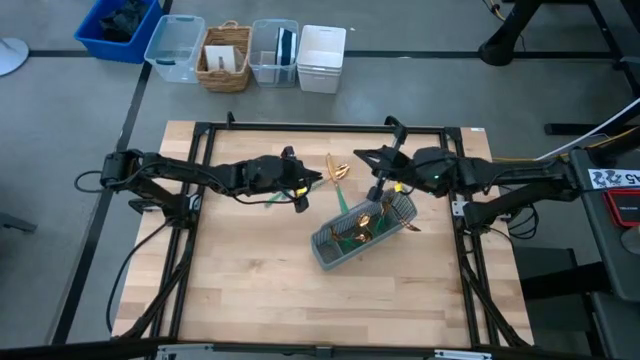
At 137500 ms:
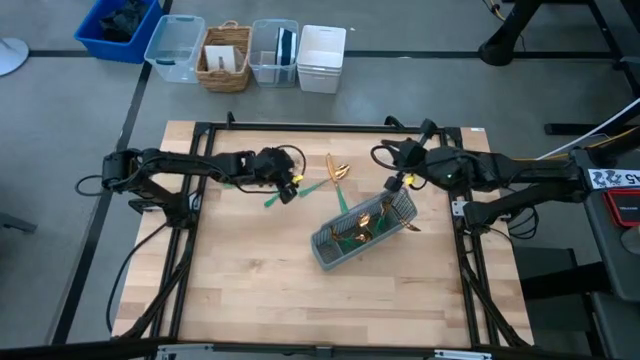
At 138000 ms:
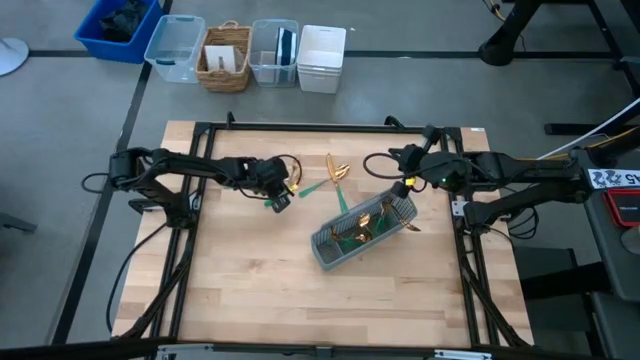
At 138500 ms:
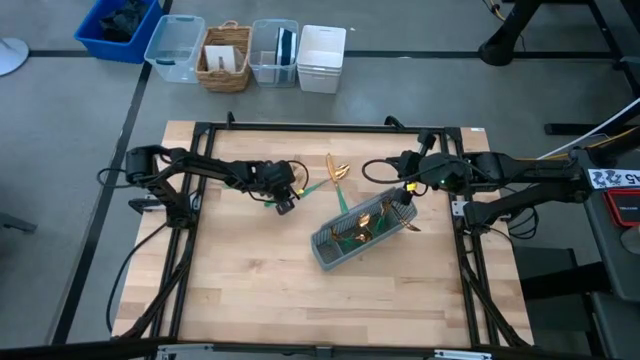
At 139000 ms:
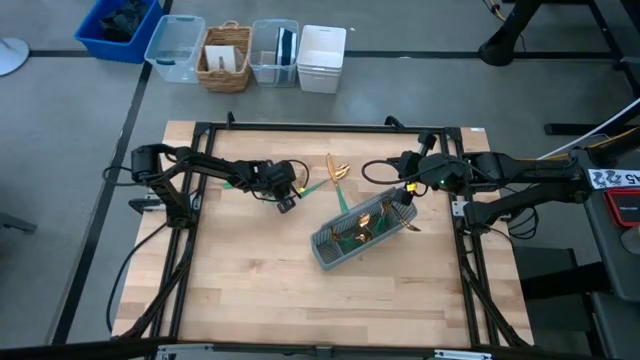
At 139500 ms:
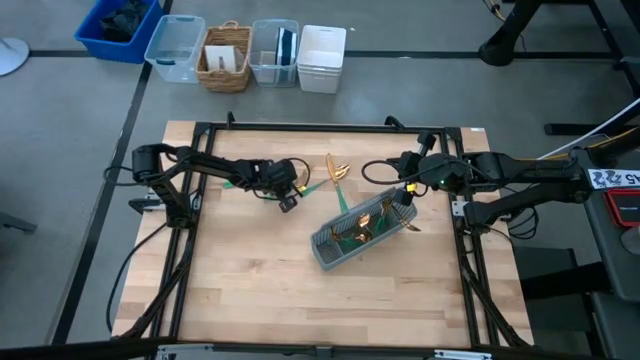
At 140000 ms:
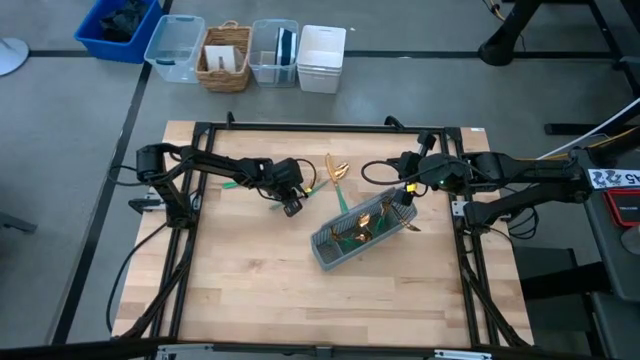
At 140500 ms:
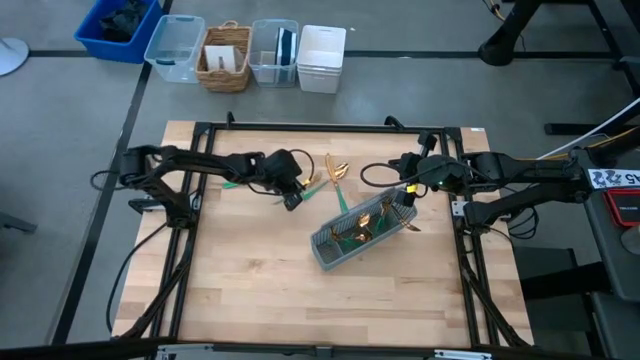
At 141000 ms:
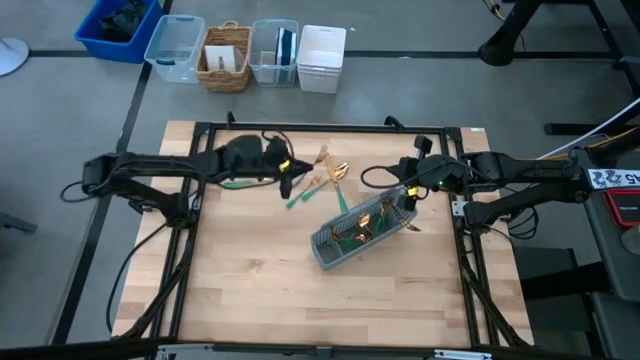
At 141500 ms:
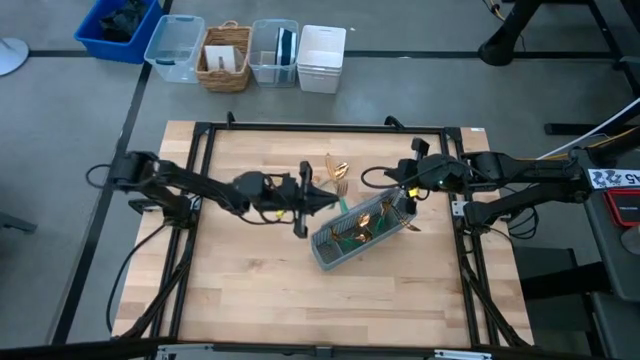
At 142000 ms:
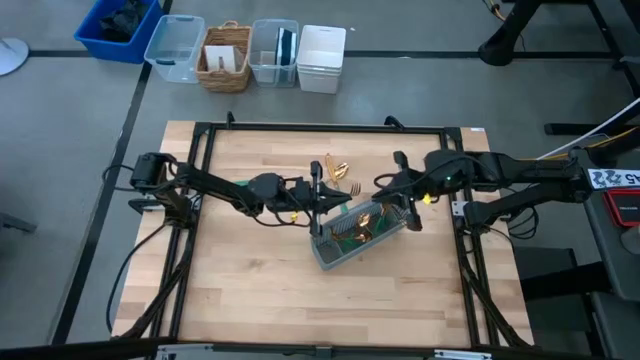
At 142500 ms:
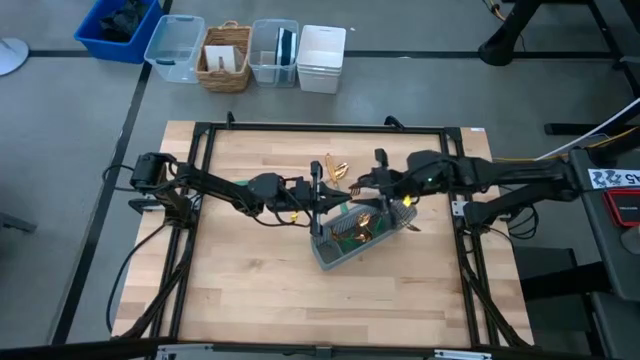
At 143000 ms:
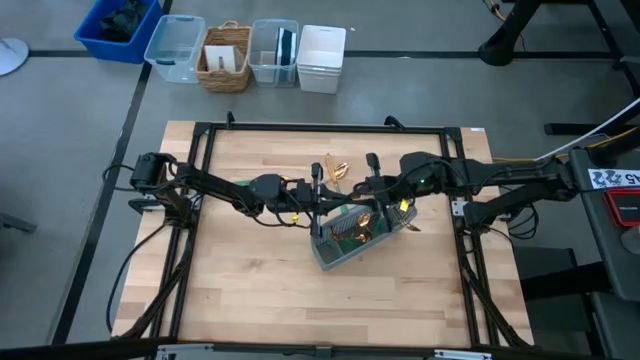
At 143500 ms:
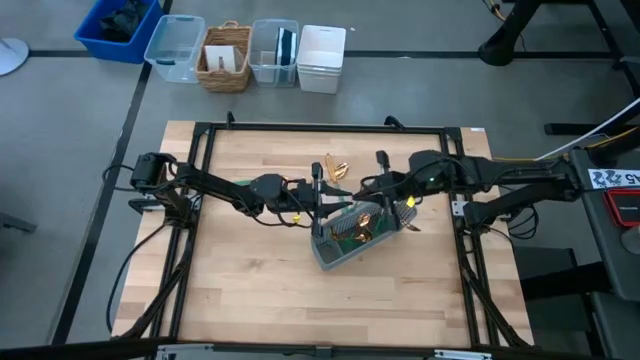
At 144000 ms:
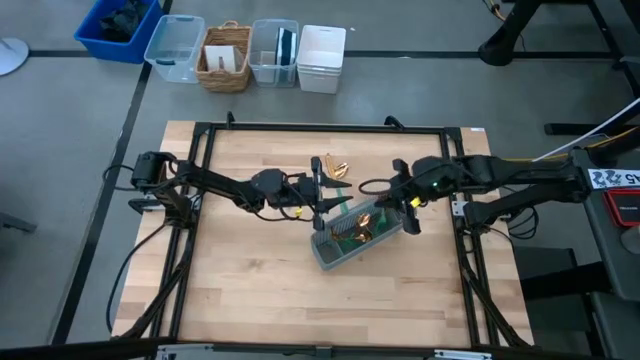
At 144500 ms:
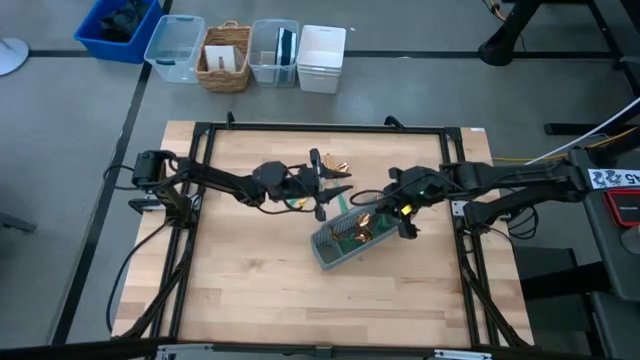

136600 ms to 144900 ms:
Task: Sort silverware
Put the gold fork into the gray silverware organizer

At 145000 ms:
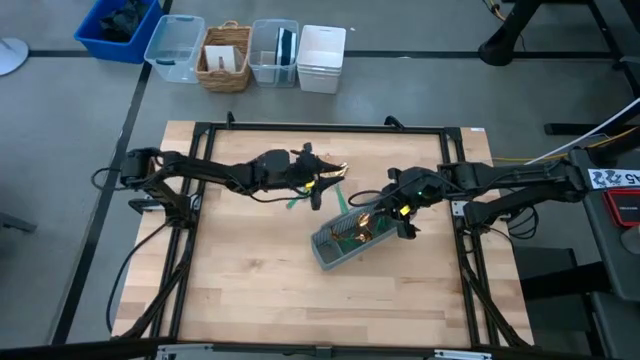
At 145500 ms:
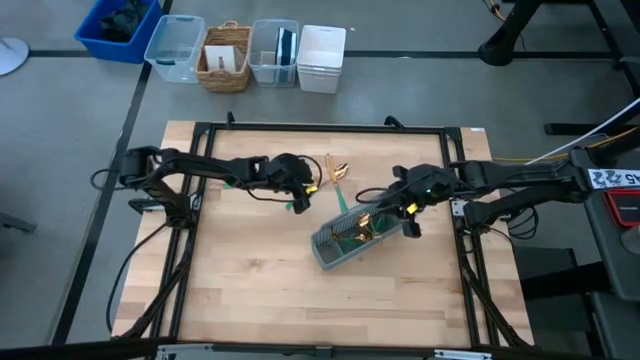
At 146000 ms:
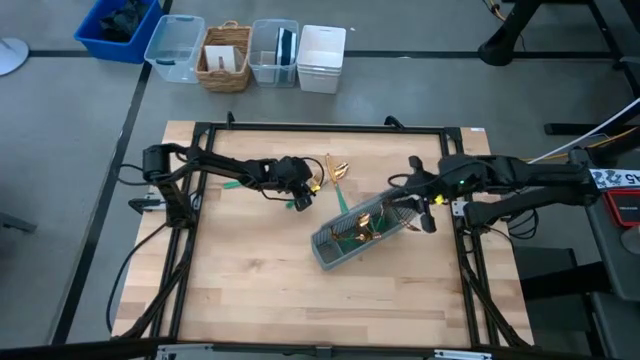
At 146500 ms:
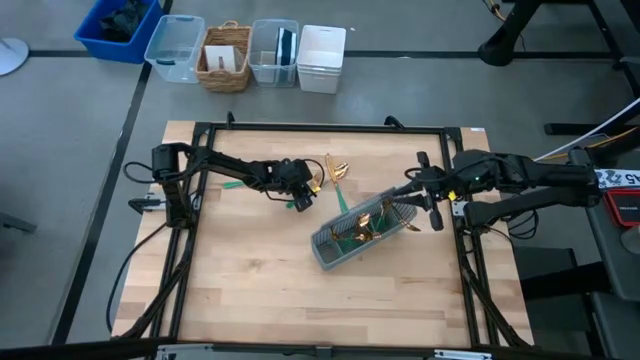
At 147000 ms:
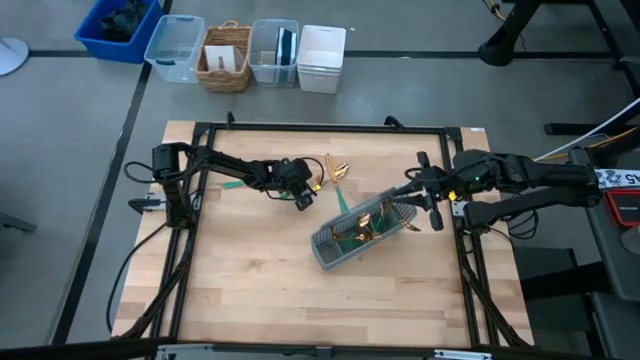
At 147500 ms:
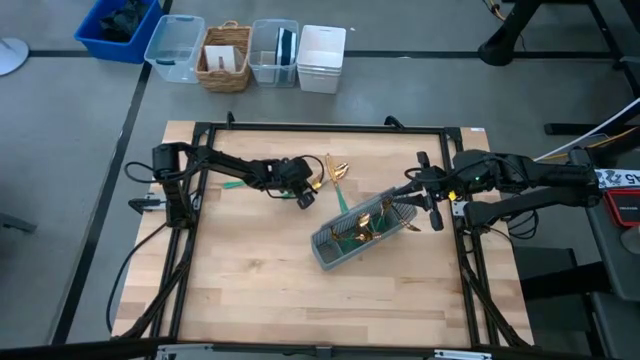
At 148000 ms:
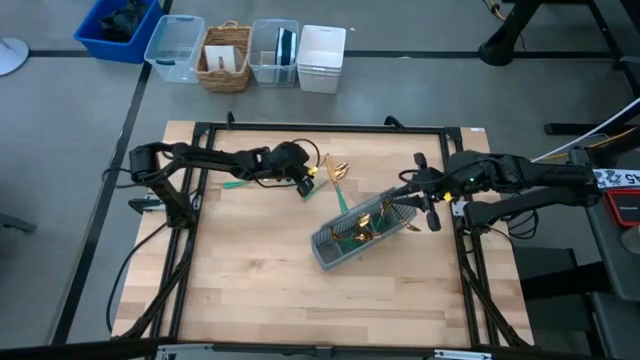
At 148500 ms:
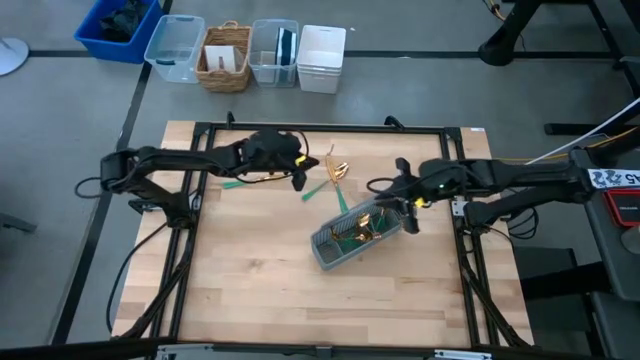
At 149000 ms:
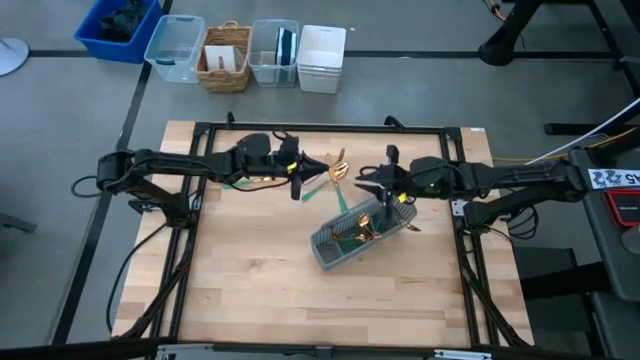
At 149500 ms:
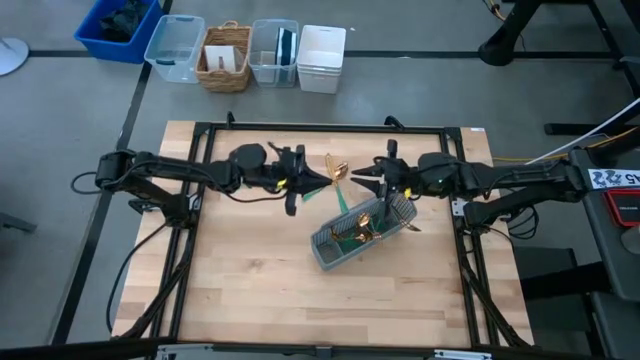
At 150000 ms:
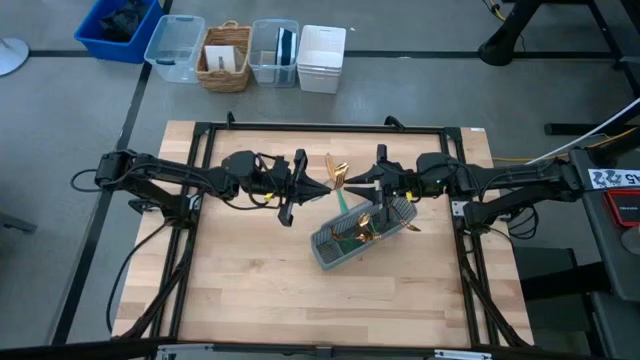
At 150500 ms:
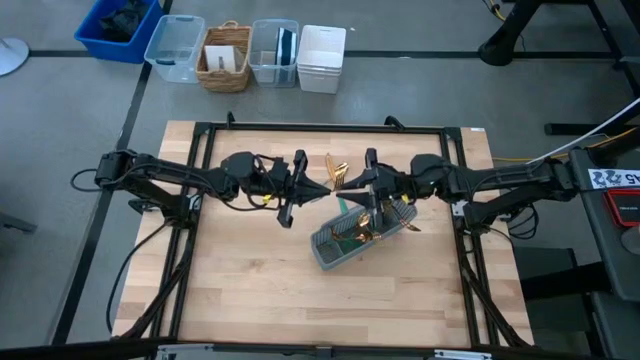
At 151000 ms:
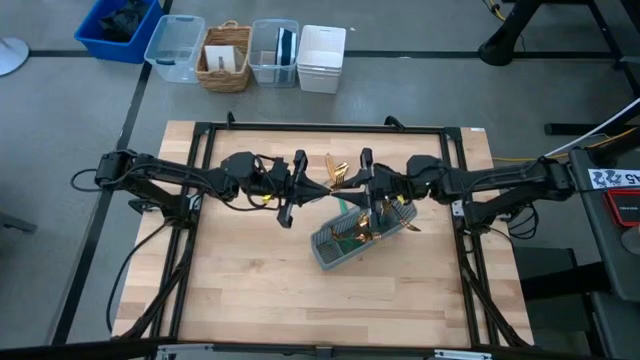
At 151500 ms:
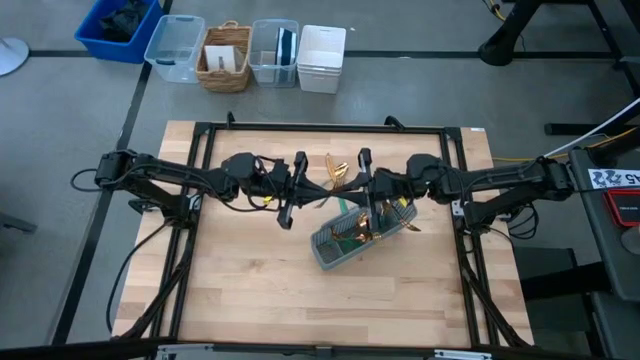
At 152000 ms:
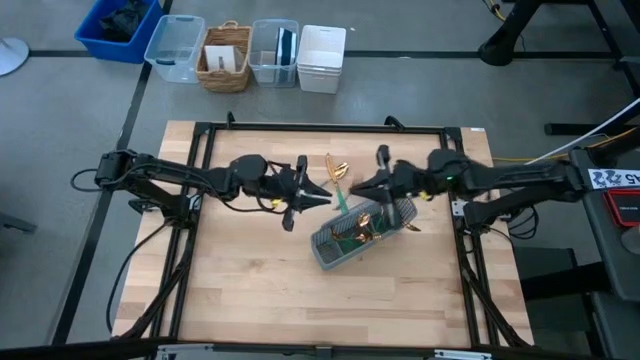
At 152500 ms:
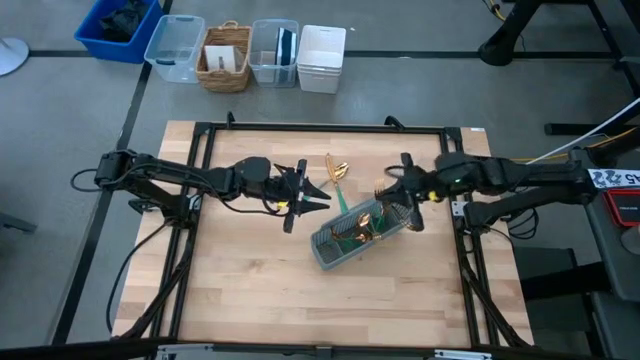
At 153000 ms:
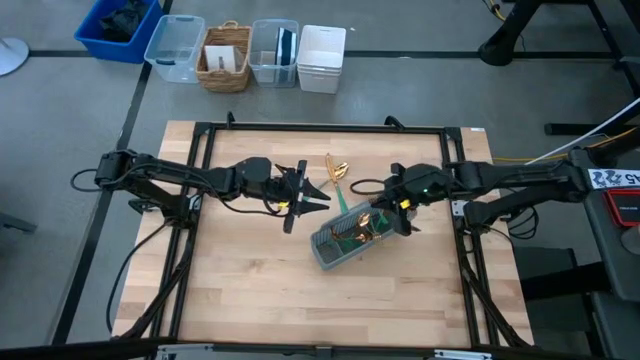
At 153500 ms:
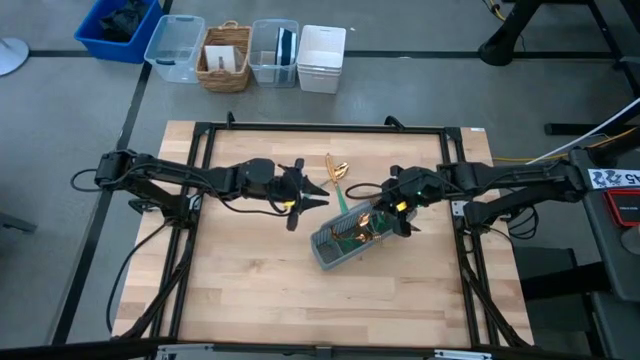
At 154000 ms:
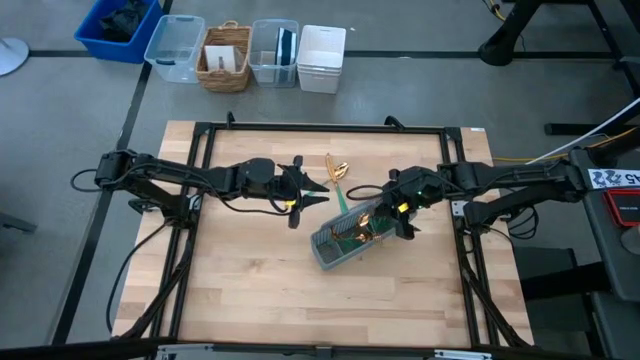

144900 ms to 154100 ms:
Put the gold fork into the gray silverware organizer

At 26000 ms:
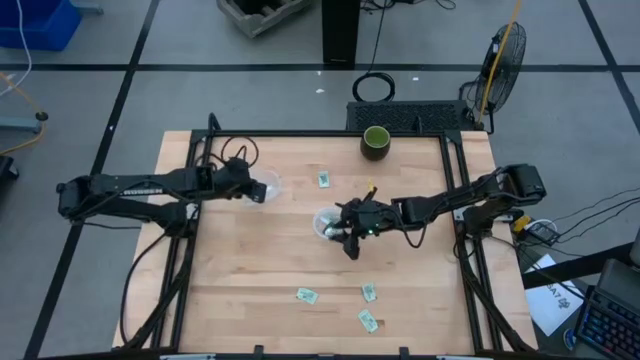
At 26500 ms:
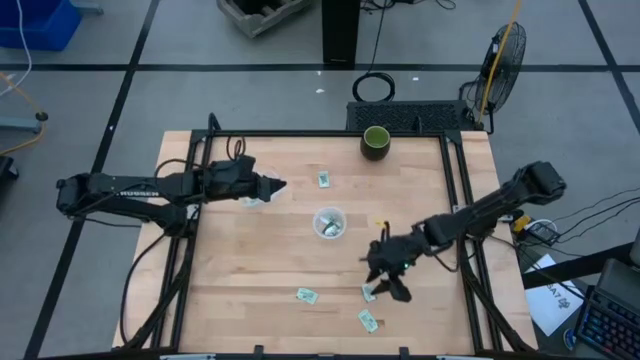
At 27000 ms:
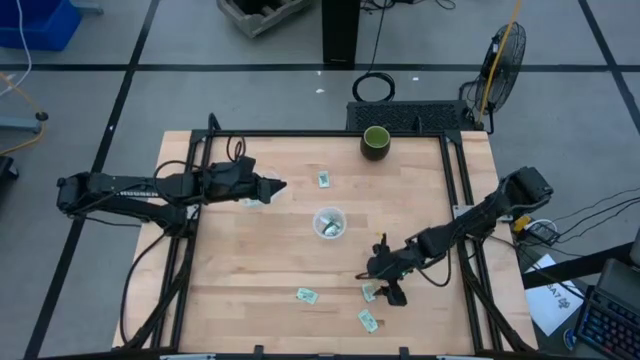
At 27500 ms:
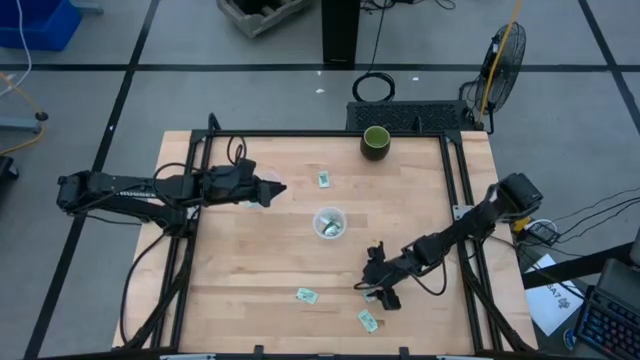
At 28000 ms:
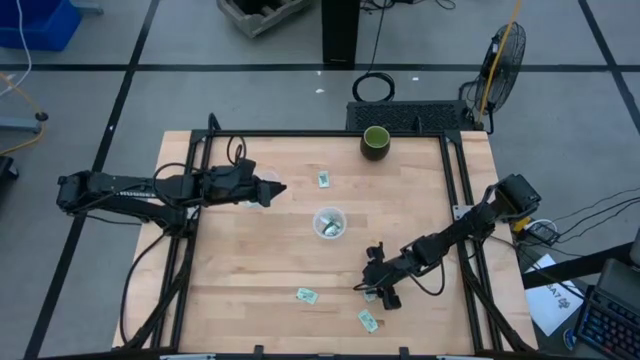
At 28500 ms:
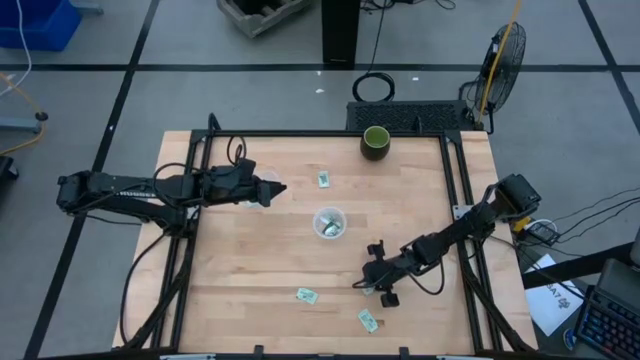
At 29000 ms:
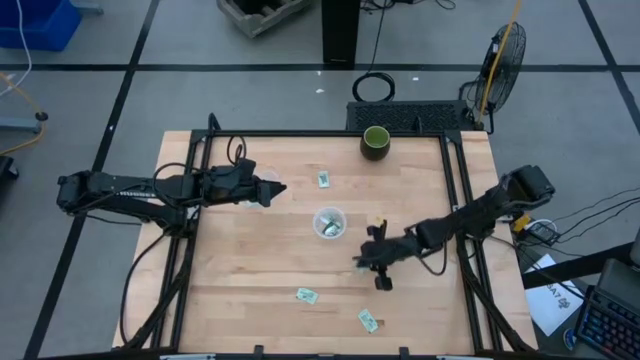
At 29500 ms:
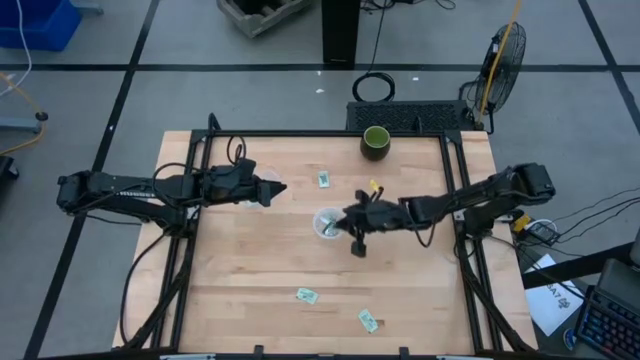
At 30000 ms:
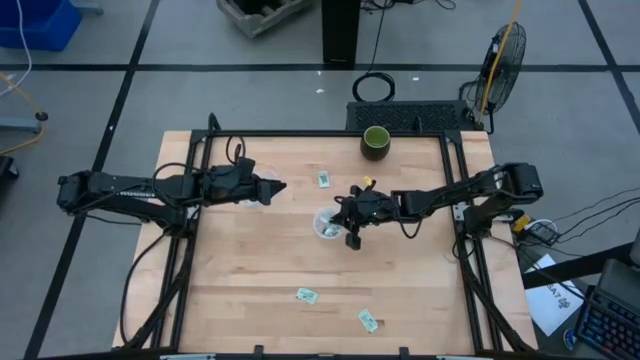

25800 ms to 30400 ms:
Task: Pick and place items into bin
Put the stevia packet into the right transparent bin
